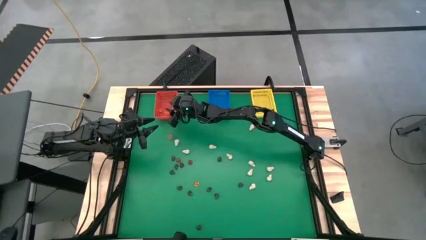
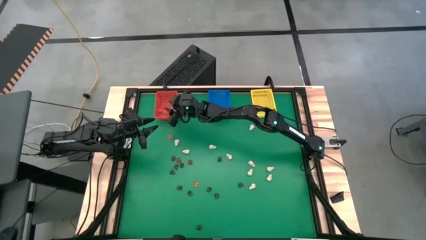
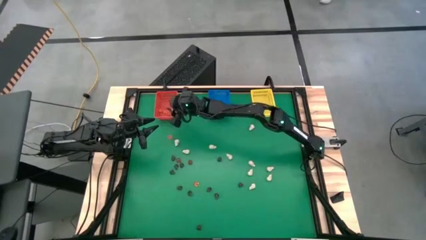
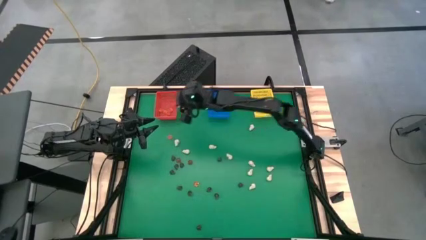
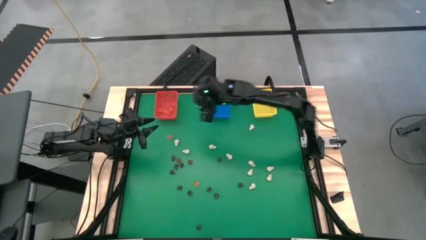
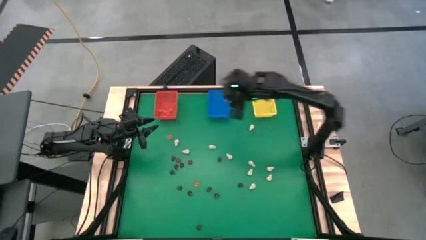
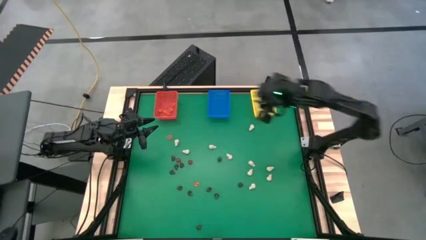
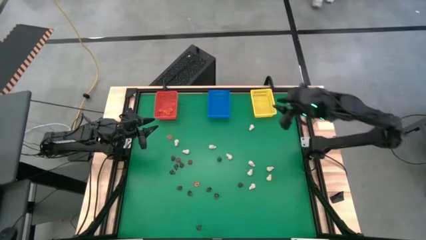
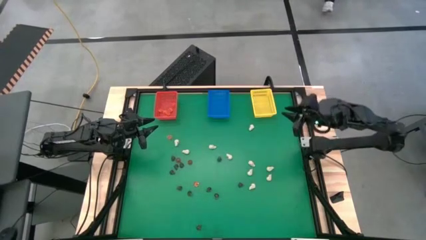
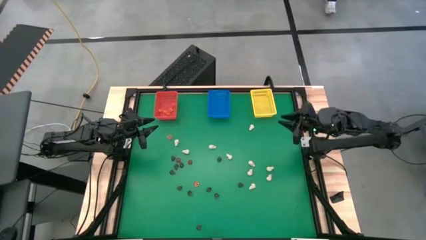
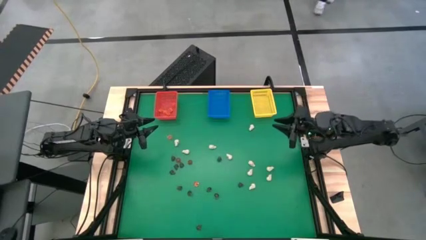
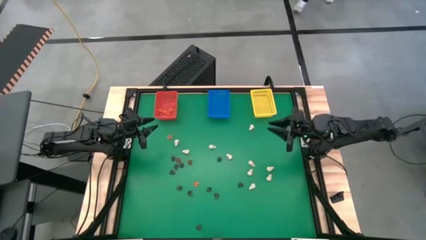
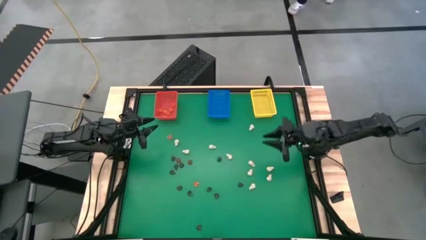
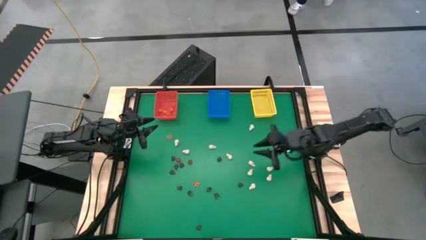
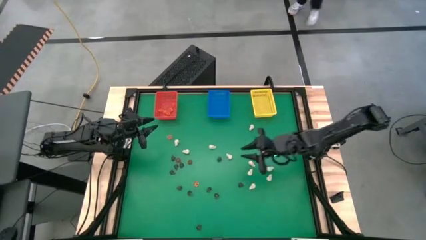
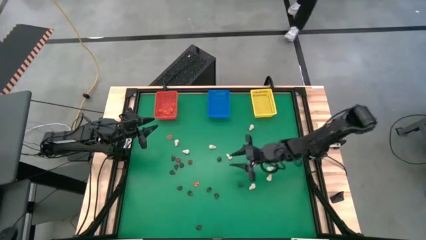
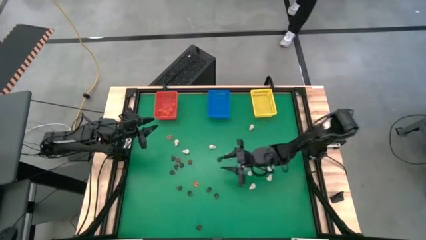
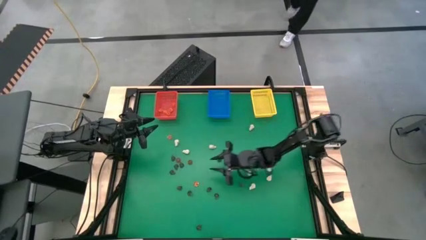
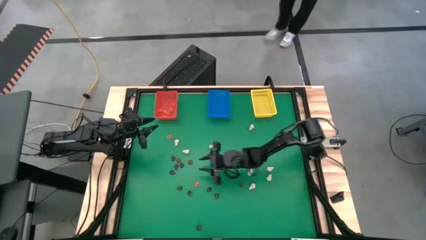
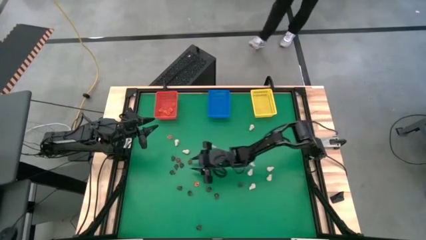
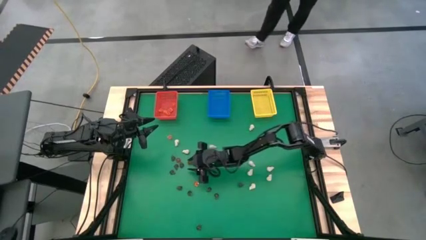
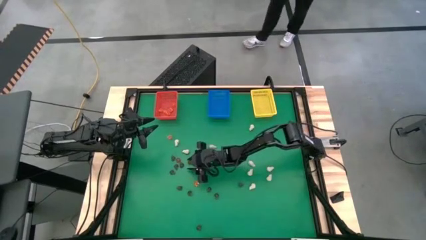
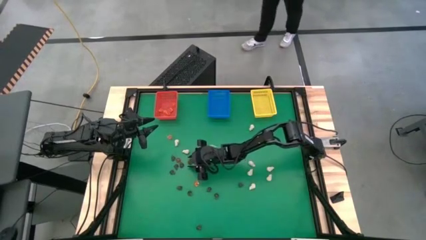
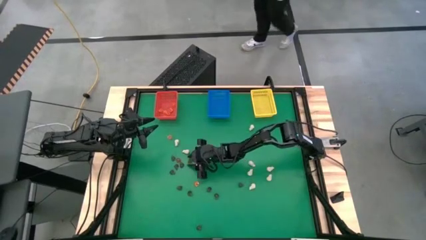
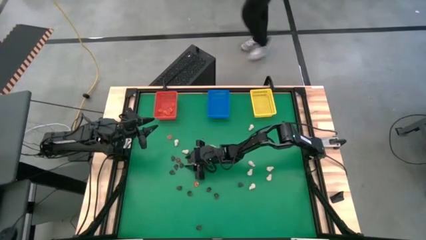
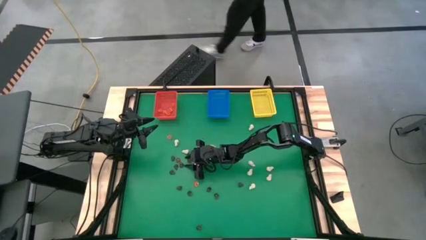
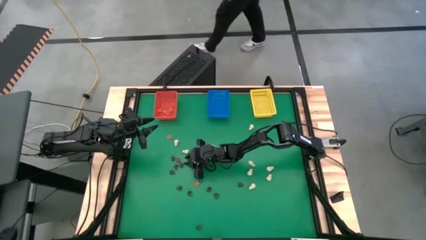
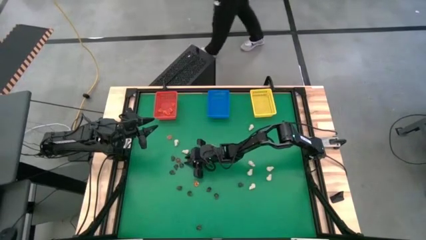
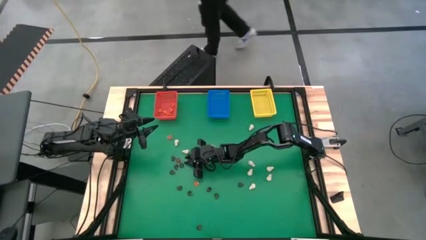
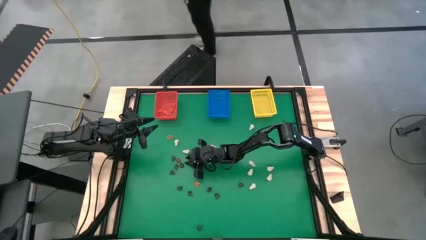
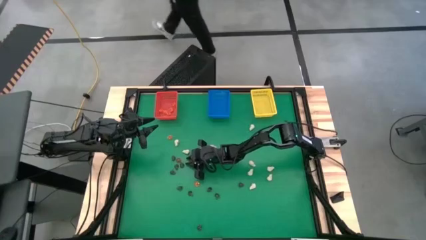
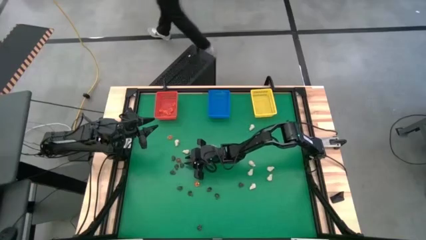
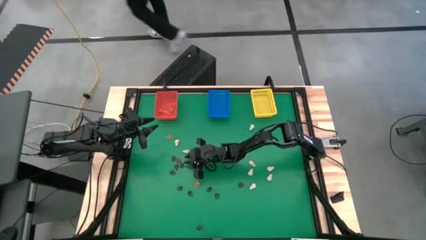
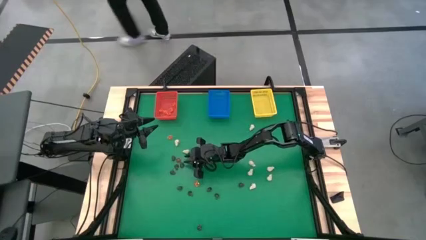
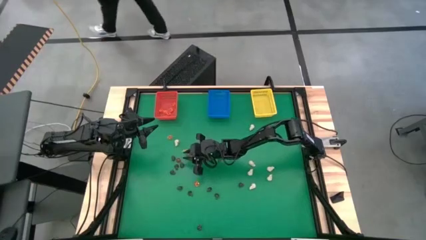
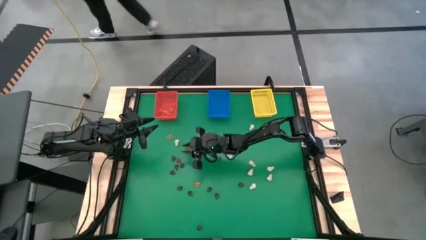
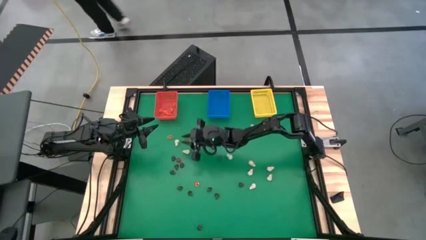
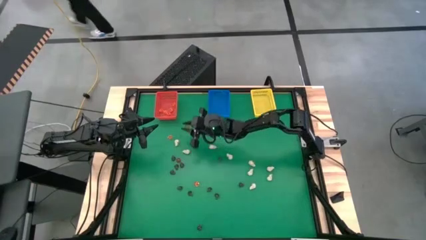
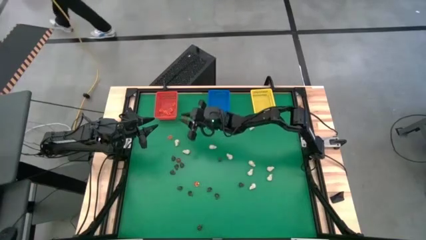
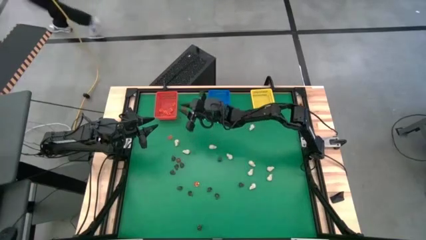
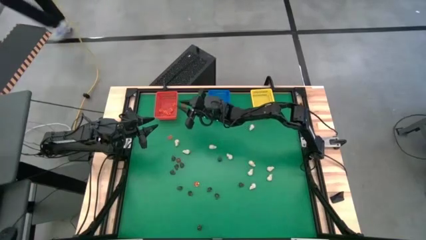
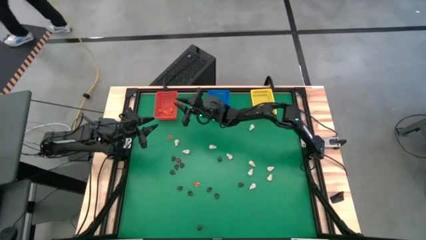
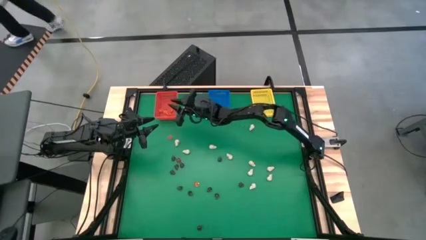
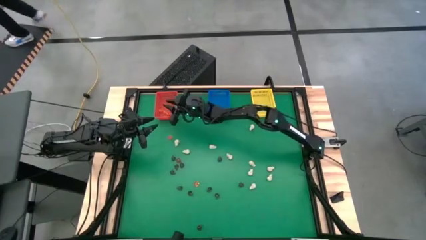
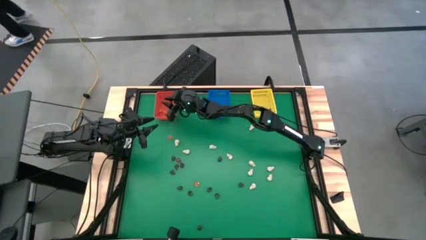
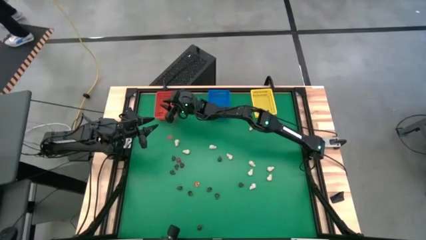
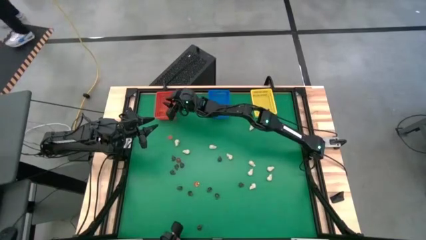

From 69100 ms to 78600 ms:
Task: Sort Halloween decoration
Put the orange pumpkin toy into the red bin

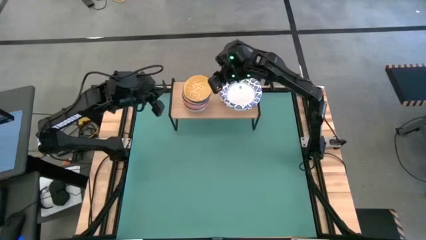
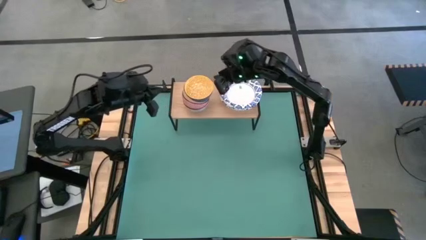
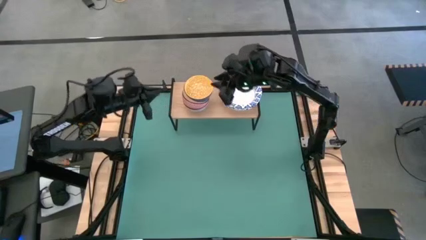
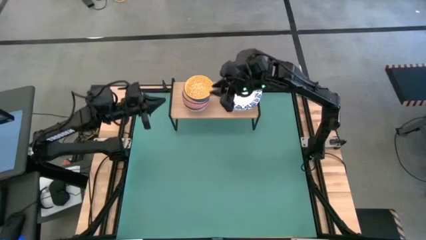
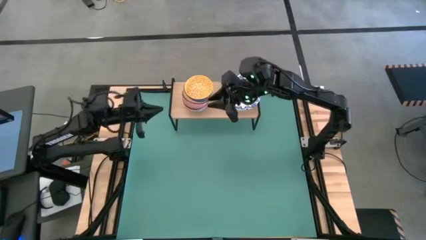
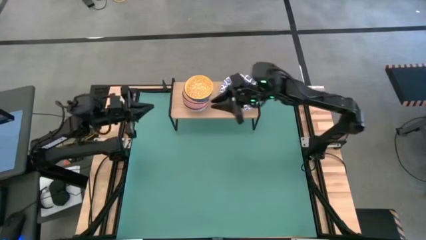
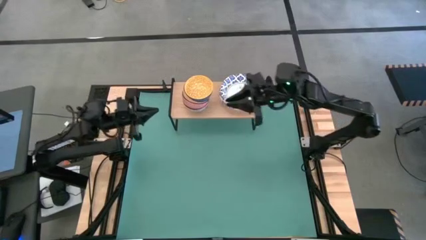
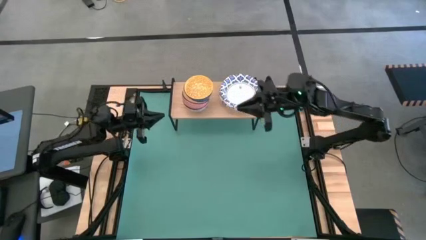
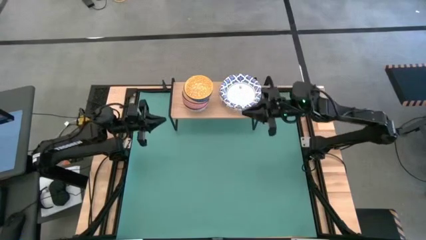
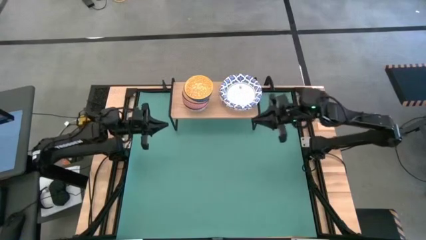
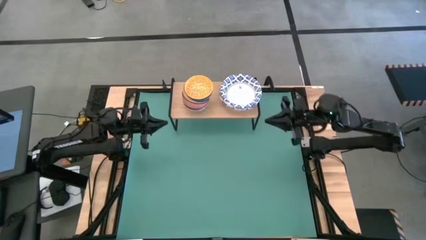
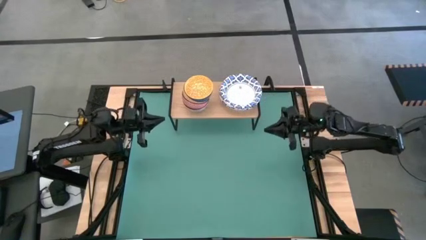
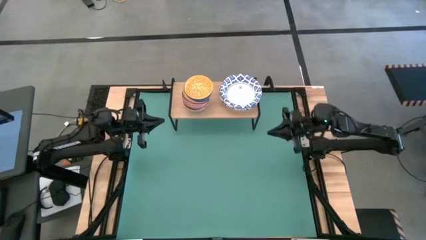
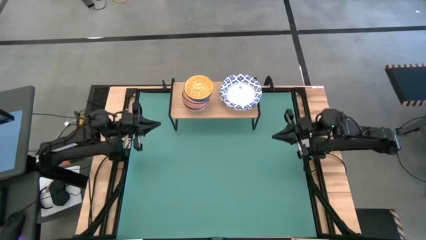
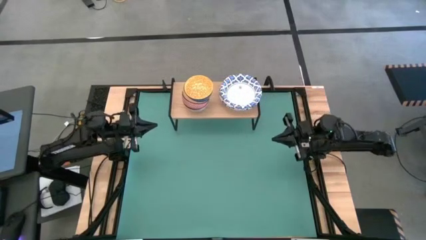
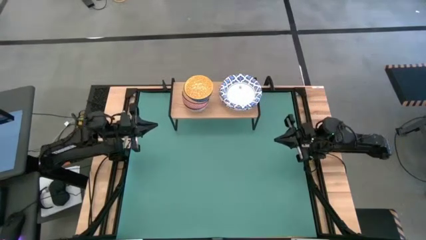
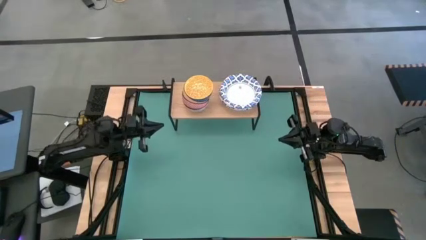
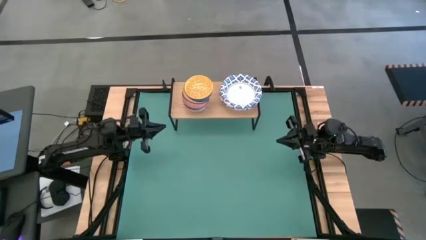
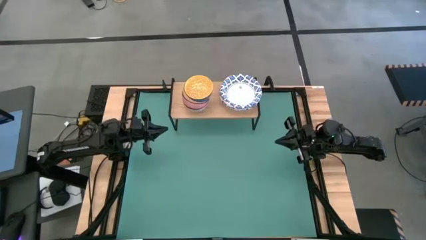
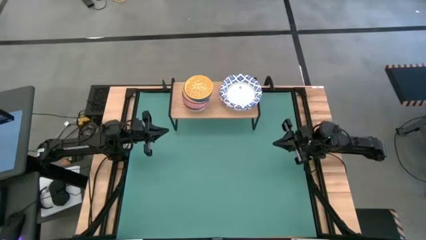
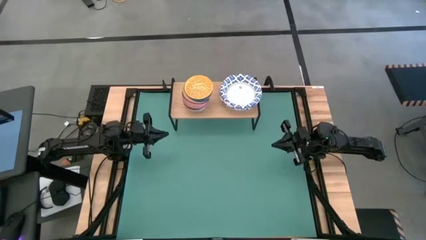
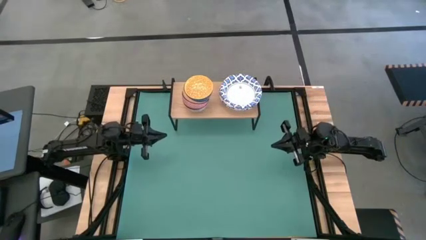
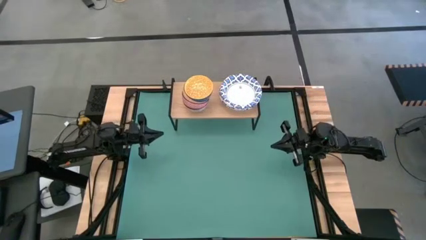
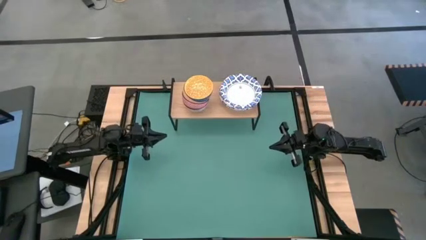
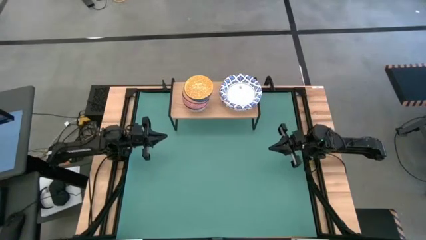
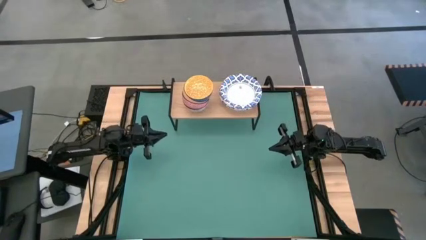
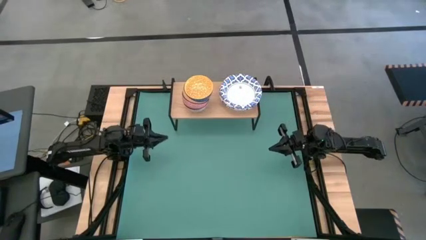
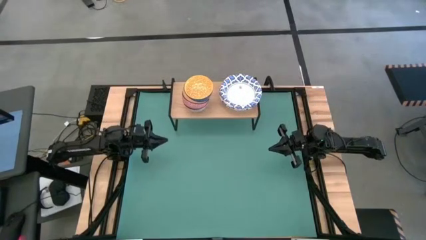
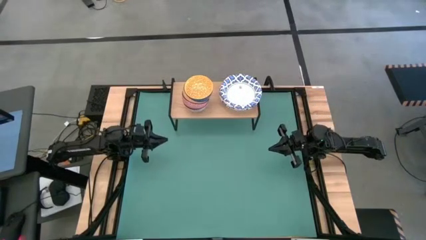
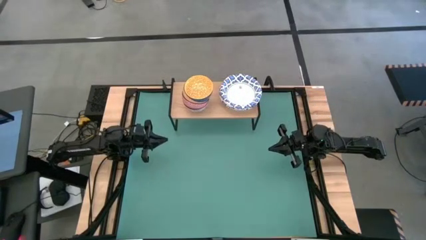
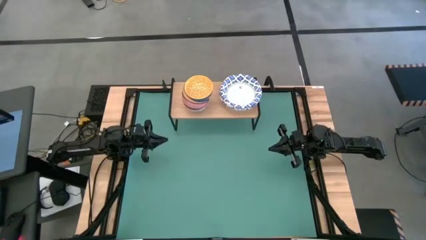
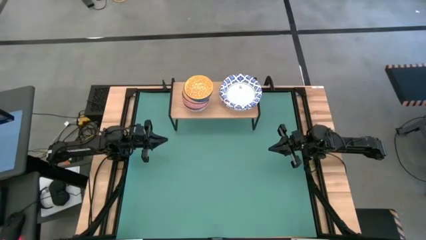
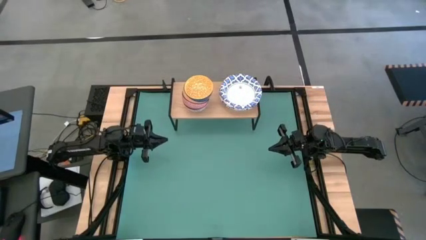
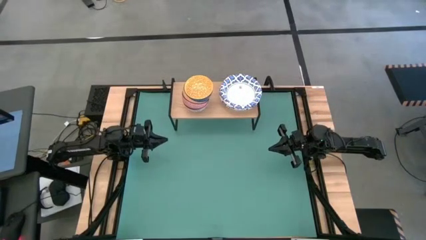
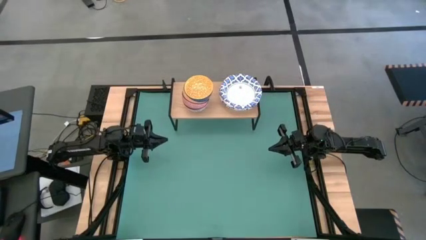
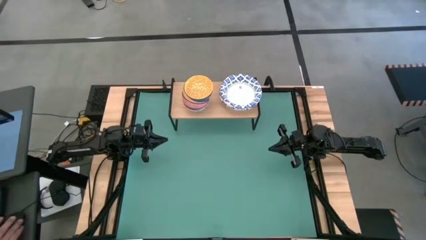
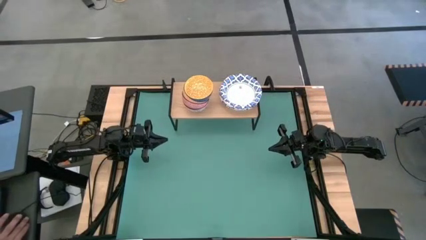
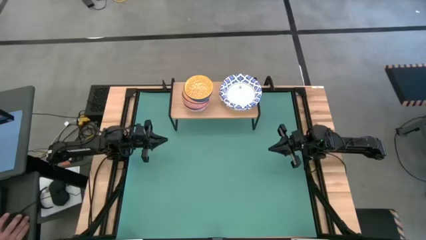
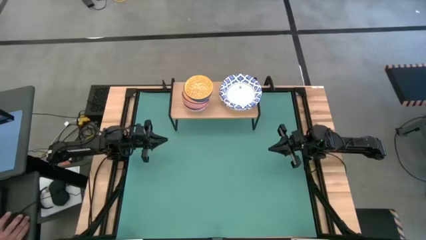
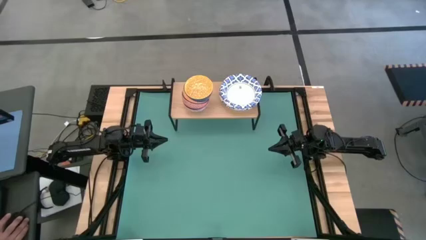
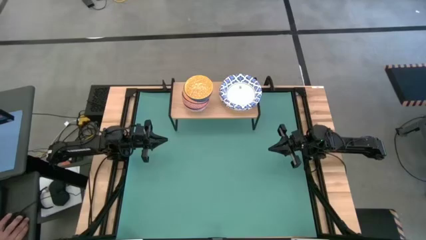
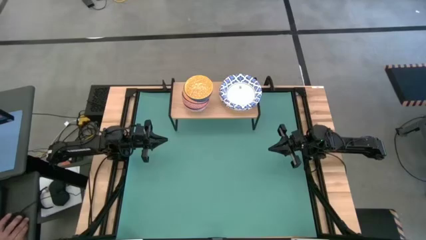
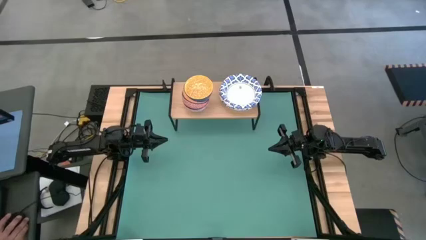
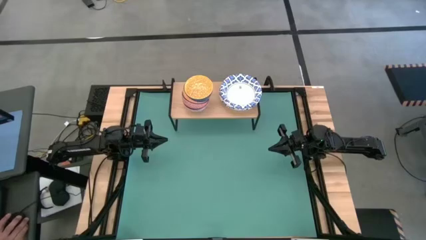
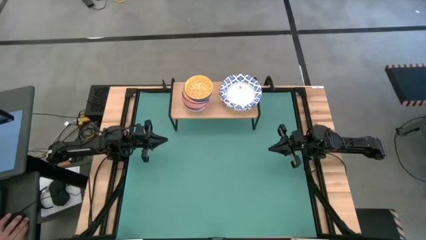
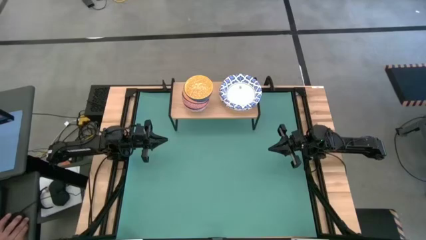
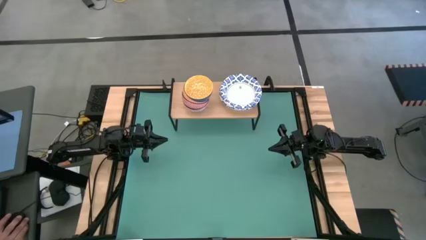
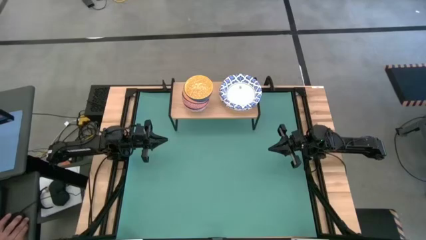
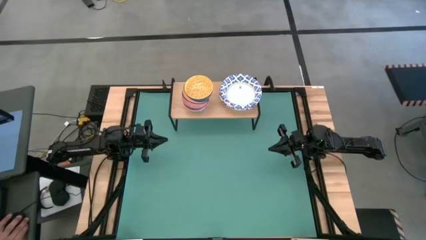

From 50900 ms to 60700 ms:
Task: Place and stack bowls onto a shelf
Return to Home Position
